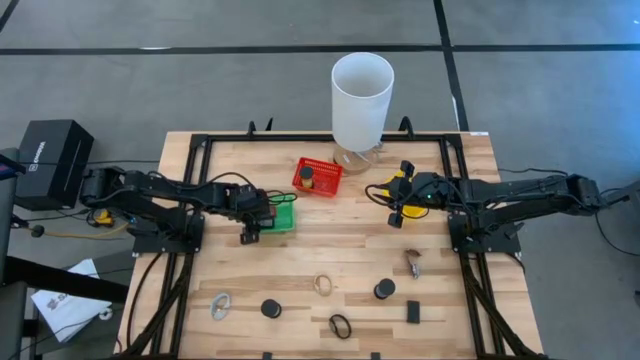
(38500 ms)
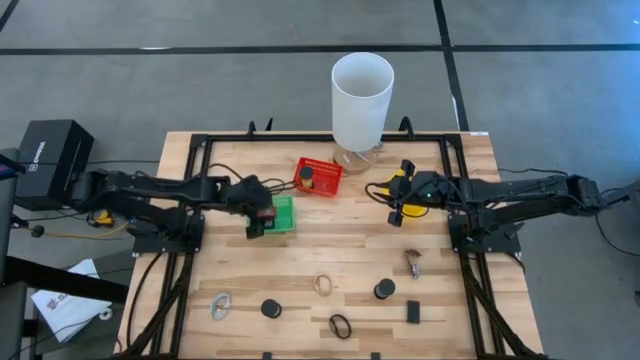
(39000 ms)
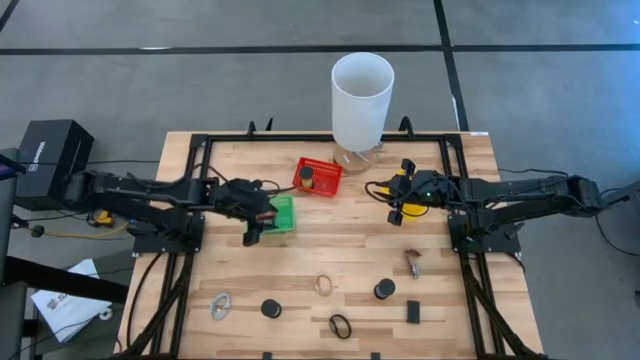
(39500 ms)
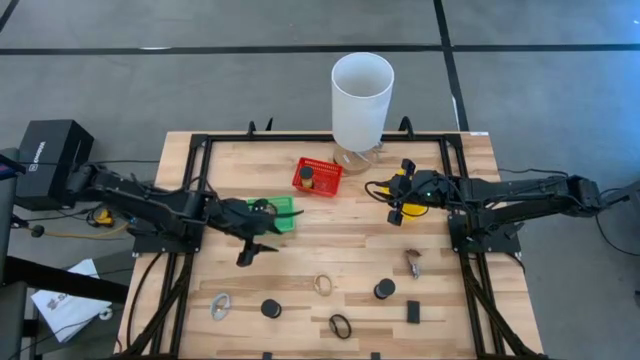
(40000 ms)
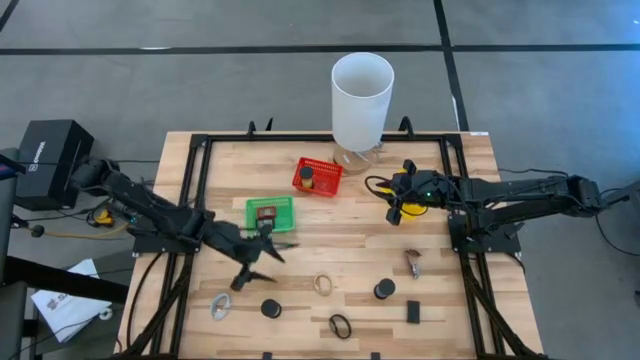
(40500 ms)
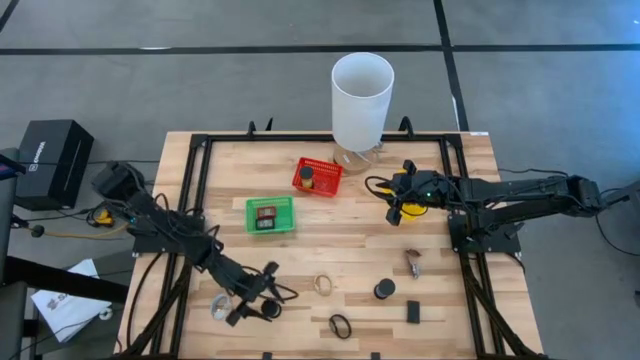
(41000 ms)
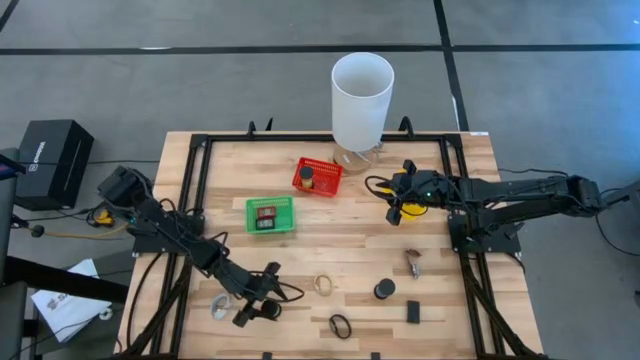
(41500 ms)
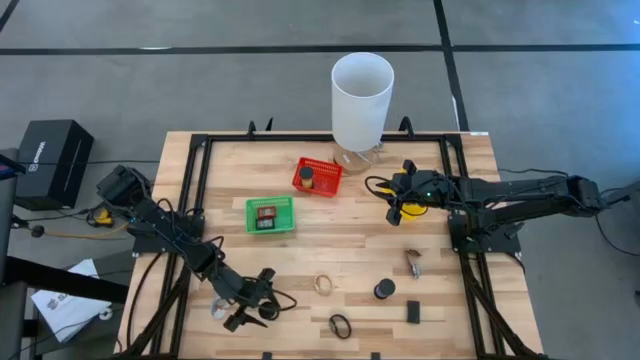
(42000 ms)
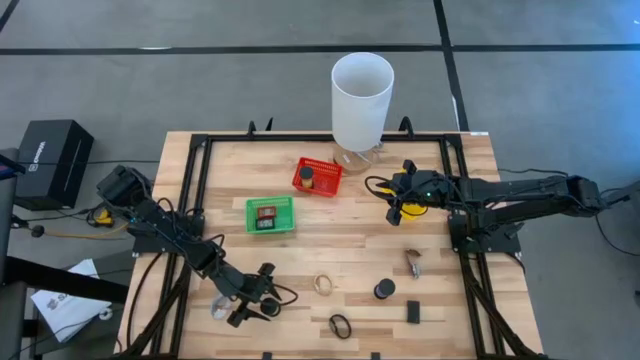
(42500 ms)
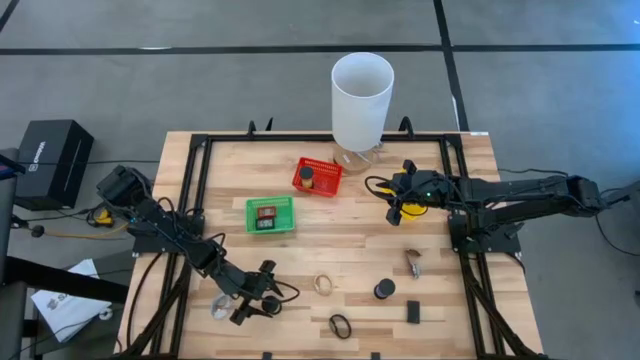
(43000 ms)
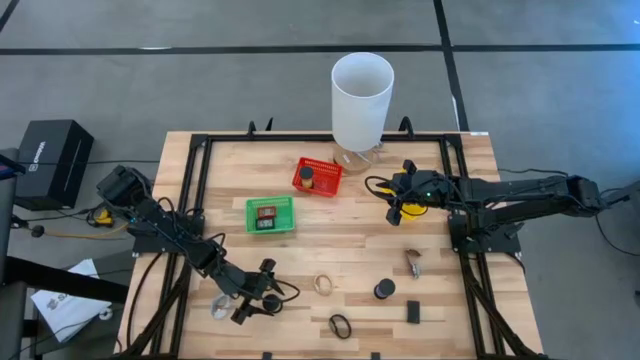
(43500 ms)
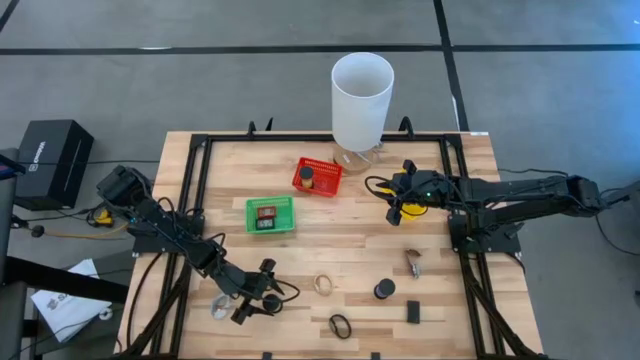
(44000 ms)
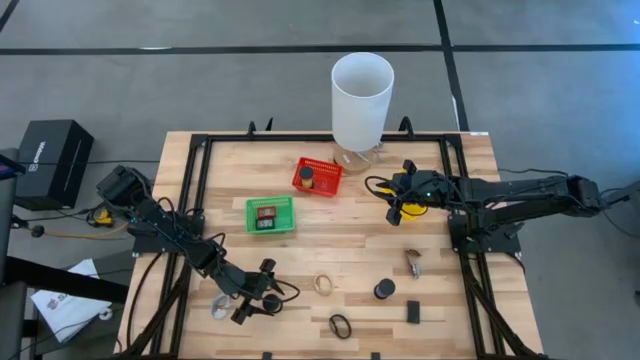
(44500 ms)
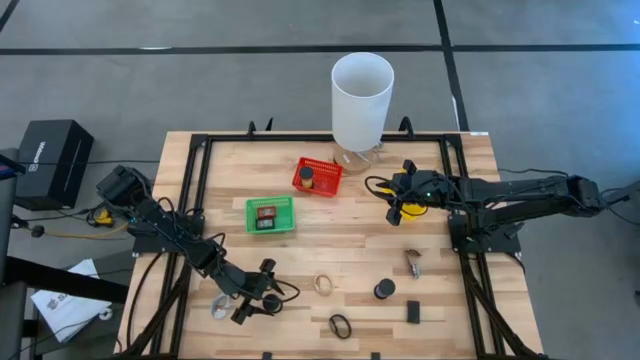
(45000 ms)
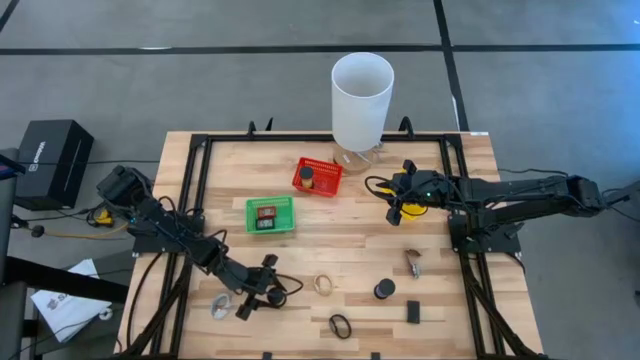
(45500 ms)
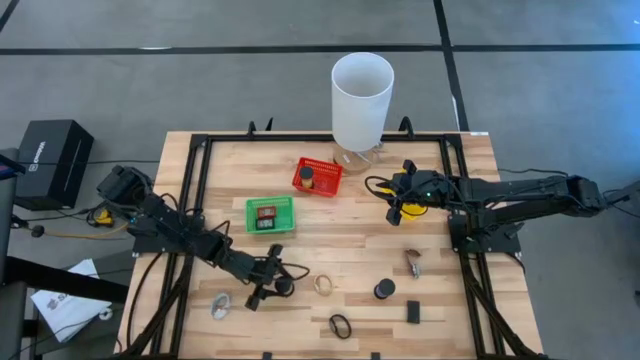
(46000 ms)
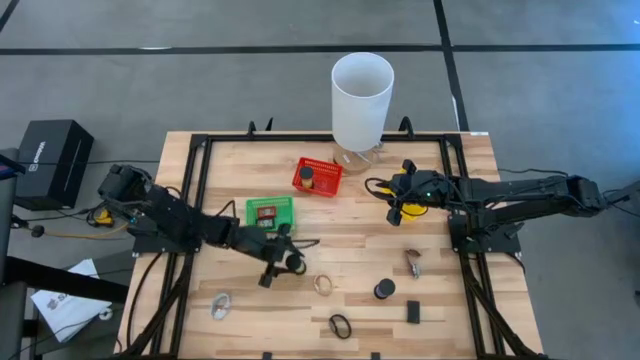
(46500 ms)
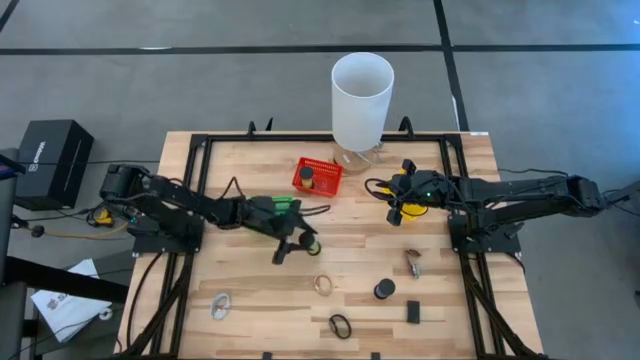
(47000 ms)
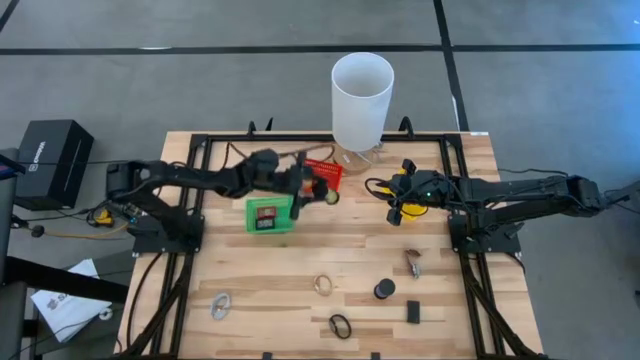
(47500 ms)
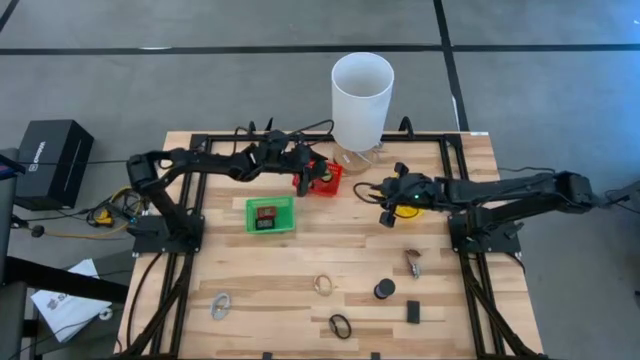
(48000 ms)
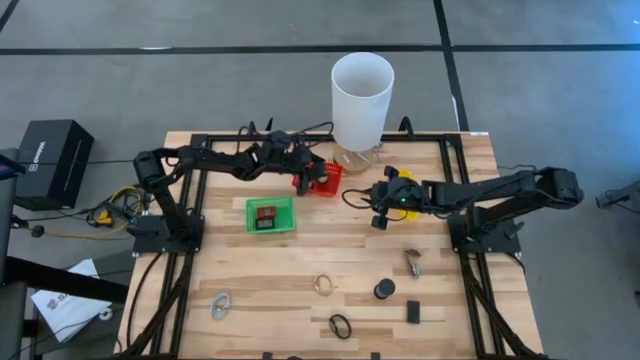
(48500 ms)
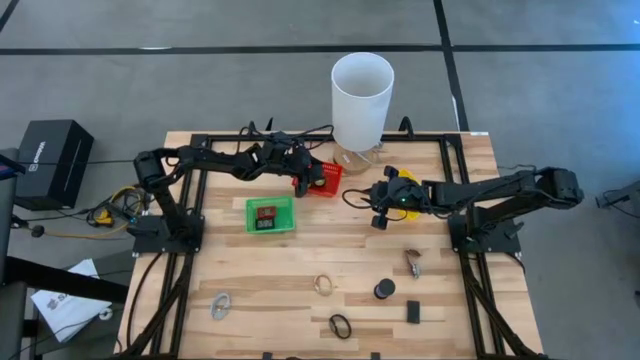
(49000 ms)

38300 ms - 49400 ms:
Task: Pick & Place Office items
Put the left black hourglass into the red bin

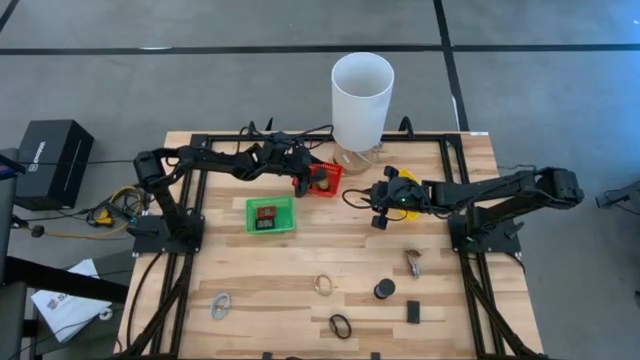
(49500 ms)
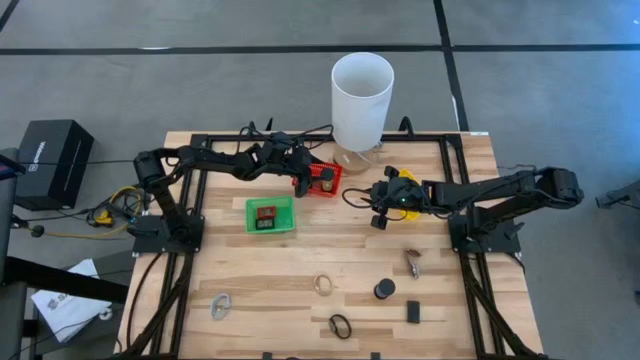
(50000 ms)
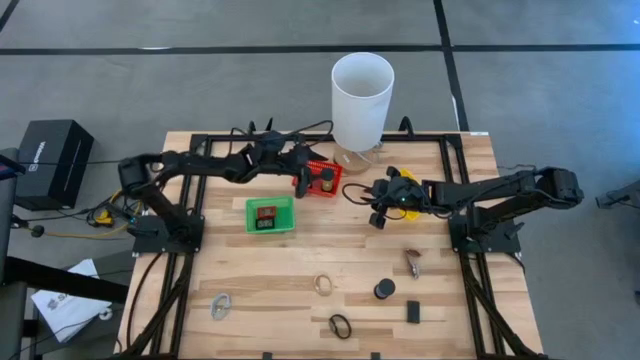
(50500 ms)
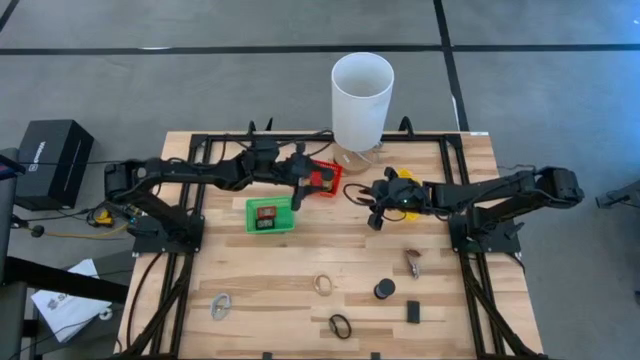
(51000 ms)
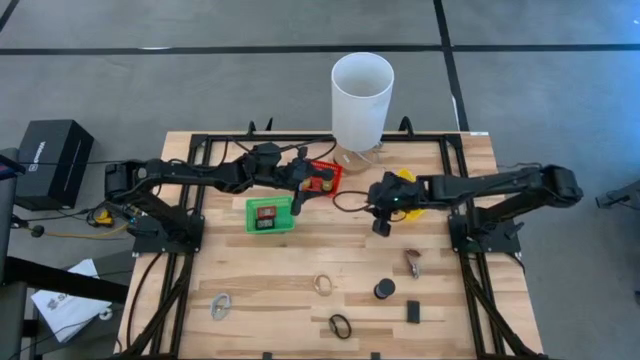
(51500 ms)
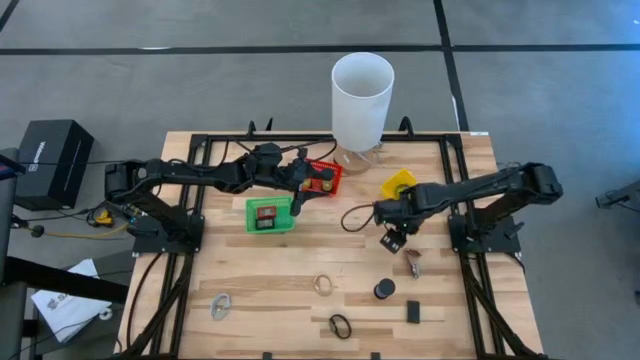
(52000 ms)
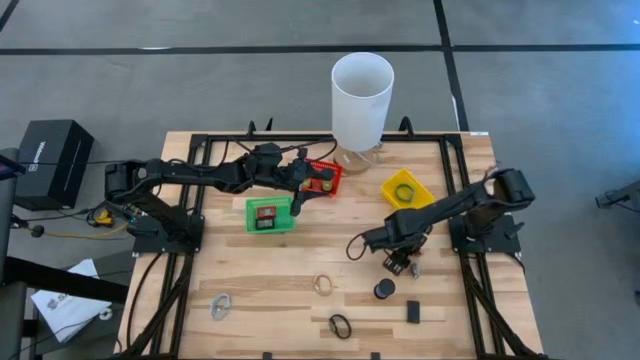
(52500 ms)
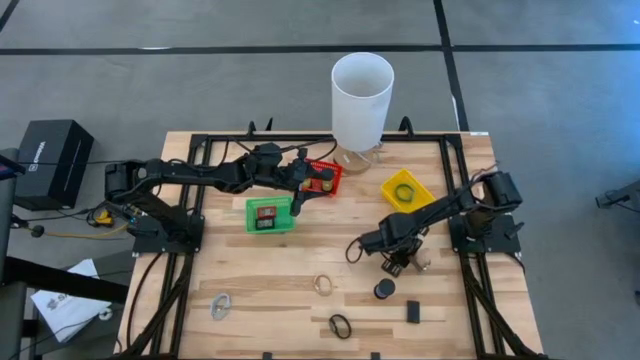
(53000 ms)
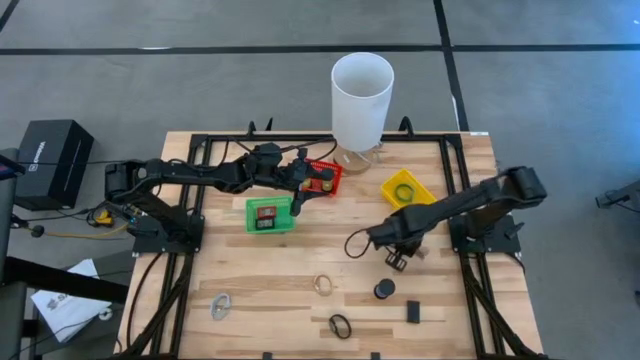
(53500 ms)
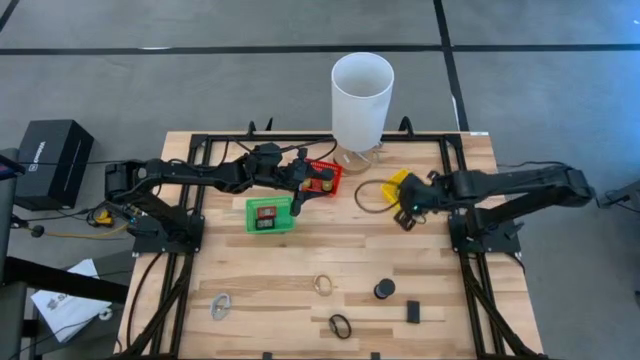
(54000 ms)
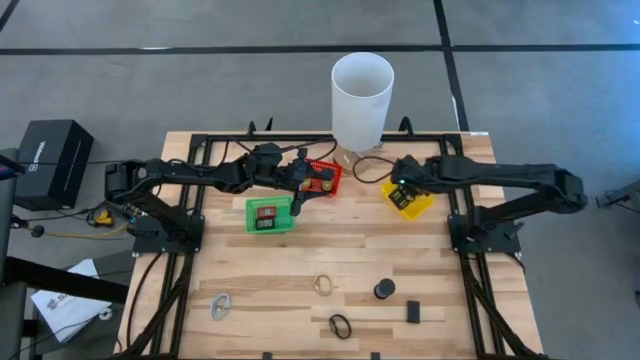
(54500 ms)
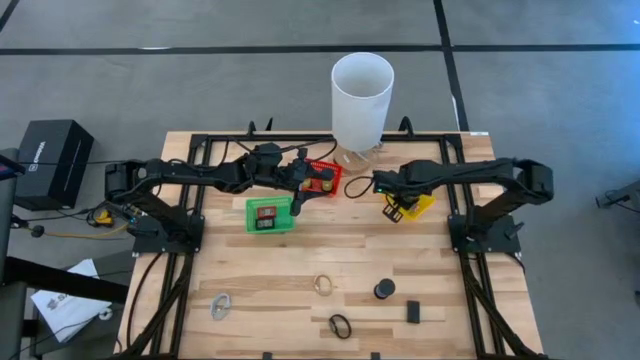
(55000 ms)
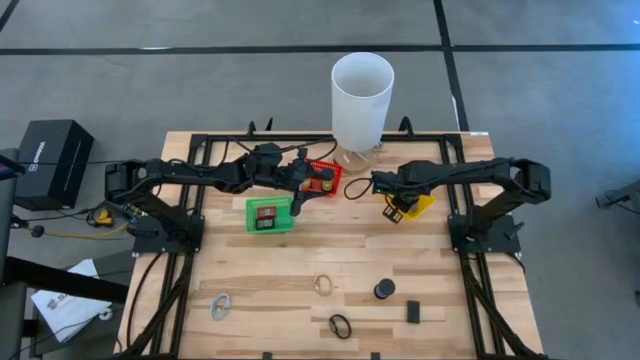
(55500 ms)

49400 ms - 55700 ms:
Put the brown watch into the yellow bin

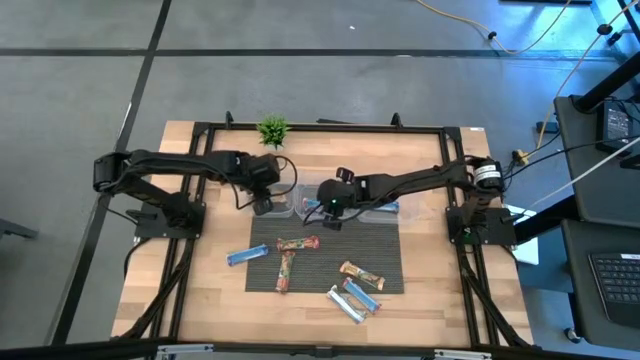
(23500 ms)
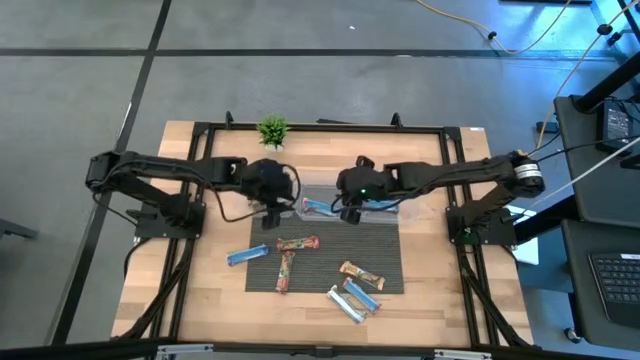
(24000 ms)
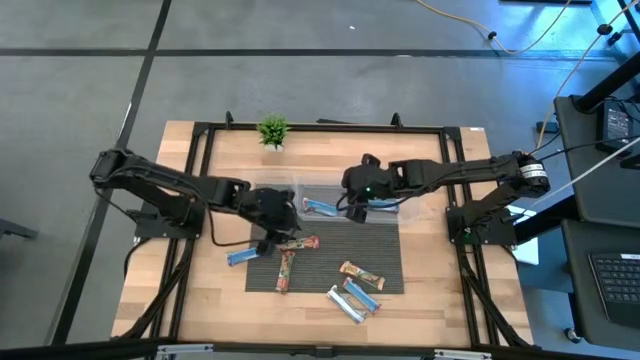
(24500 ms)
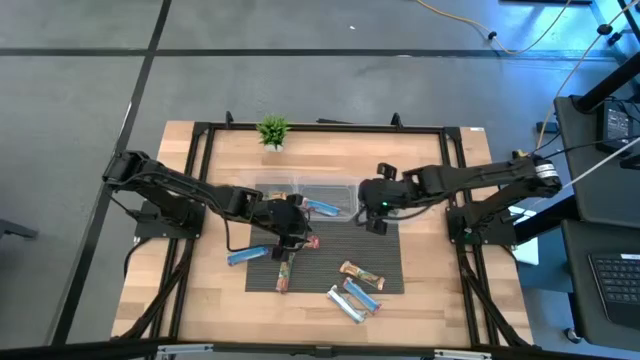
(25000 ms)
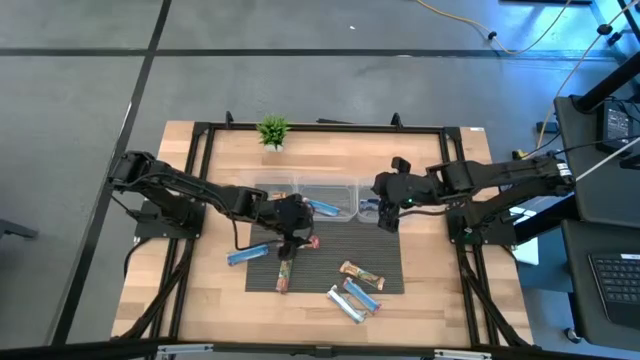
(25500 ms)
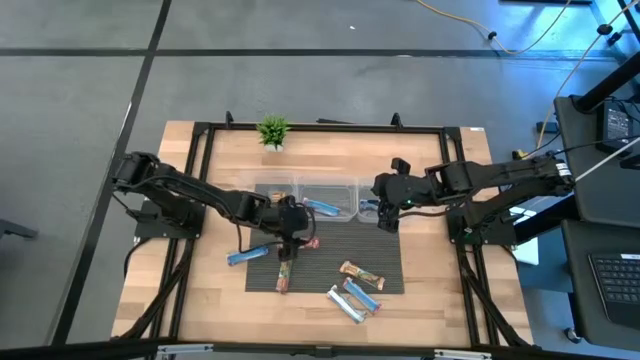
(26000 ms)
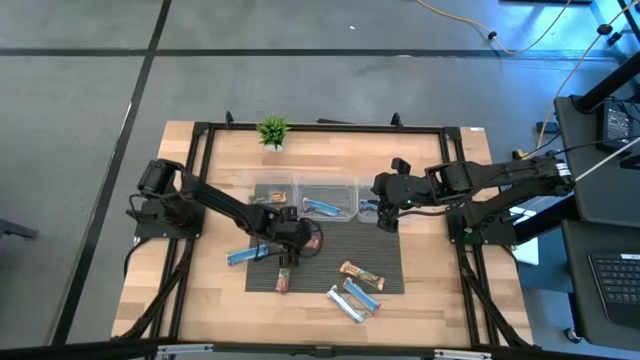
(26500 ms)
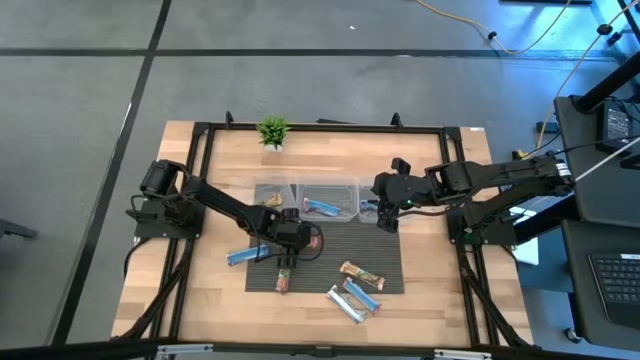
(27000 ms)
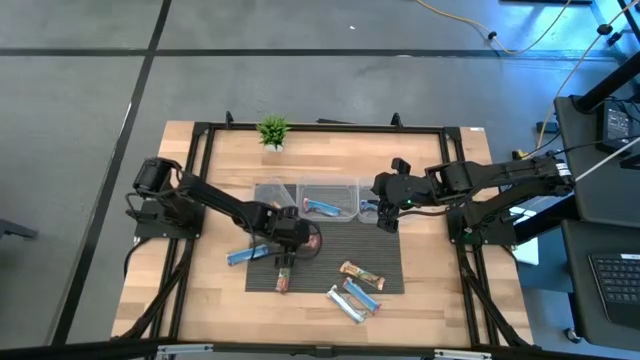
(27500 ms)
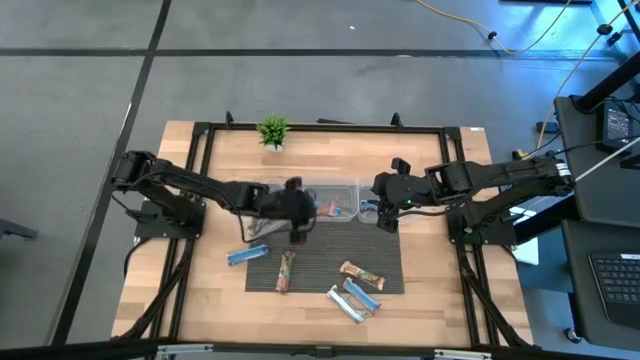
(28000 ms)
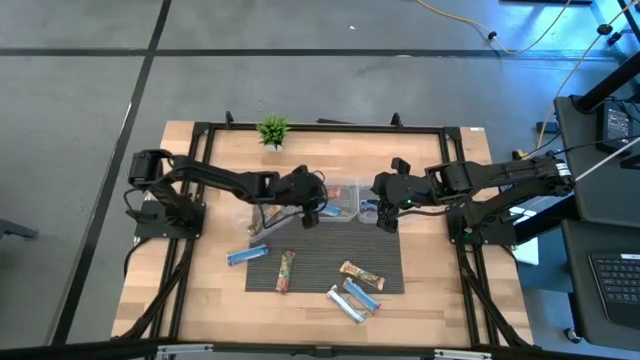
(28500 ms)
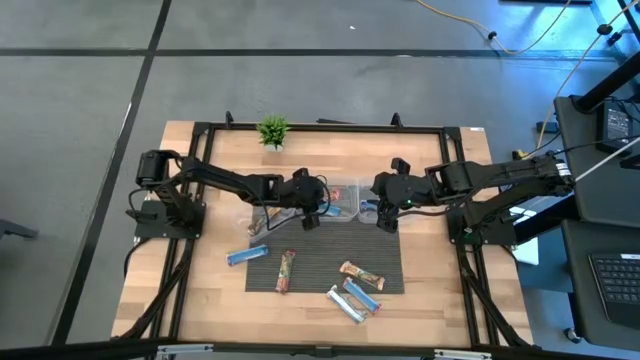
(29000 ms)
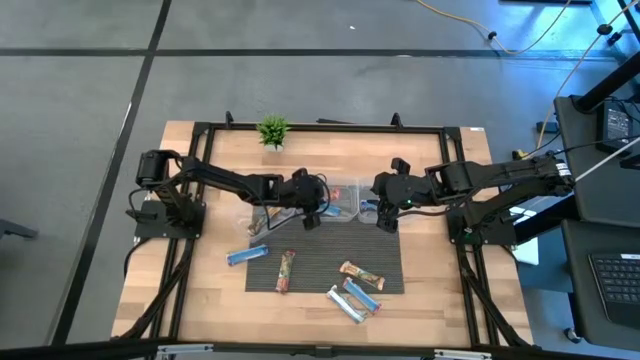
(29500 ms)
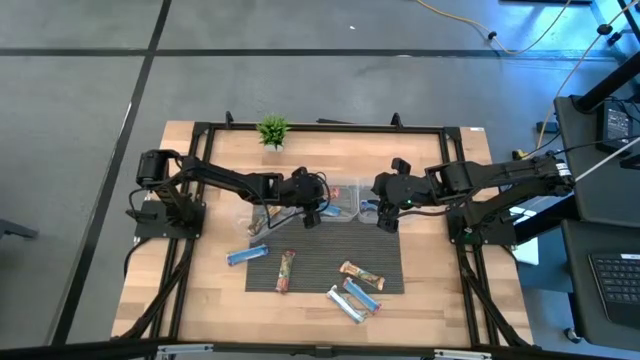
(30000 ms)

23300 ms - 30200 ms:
Task: Pick and place Granola Bars by type
Put the red granola bar into the center transparent bin
